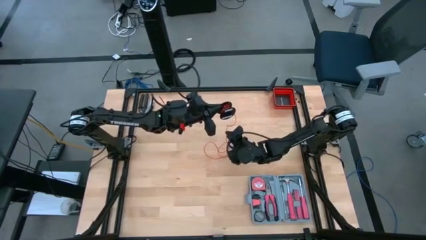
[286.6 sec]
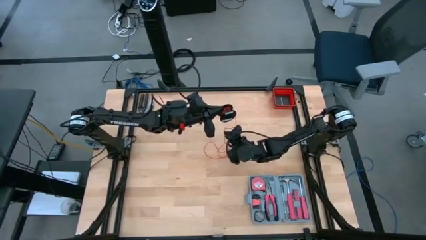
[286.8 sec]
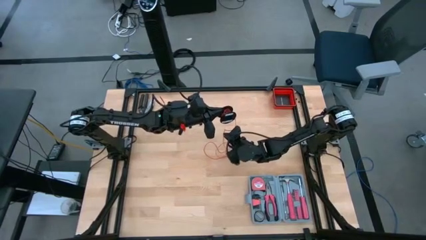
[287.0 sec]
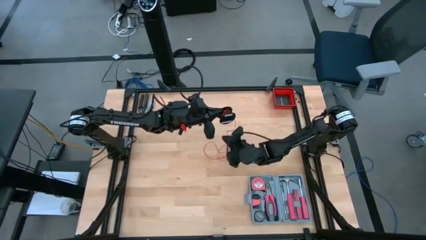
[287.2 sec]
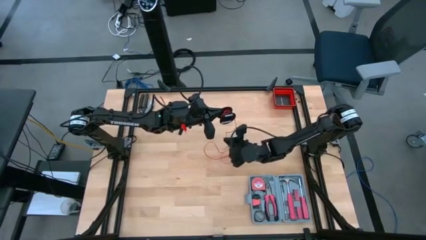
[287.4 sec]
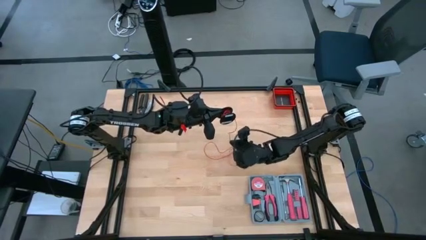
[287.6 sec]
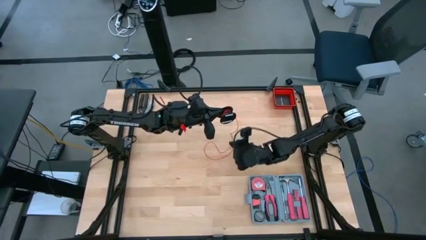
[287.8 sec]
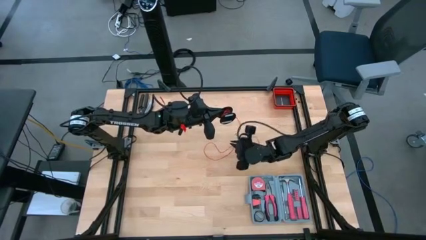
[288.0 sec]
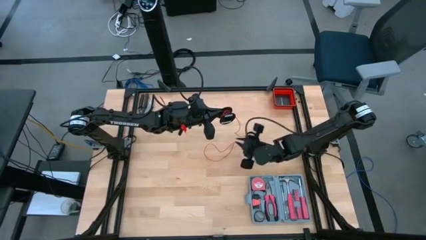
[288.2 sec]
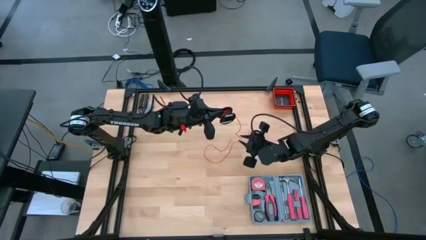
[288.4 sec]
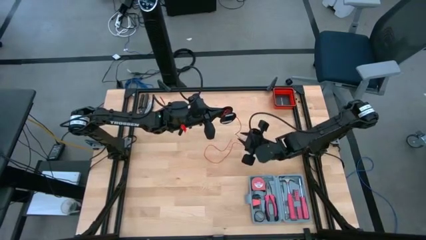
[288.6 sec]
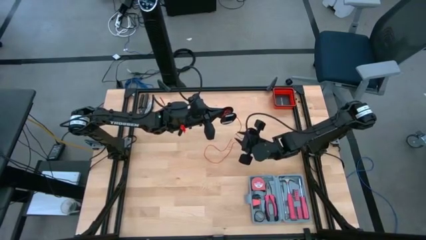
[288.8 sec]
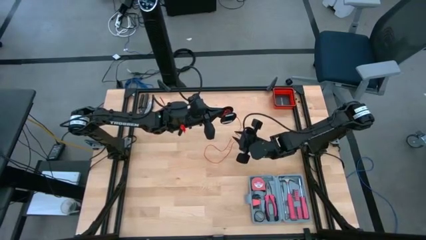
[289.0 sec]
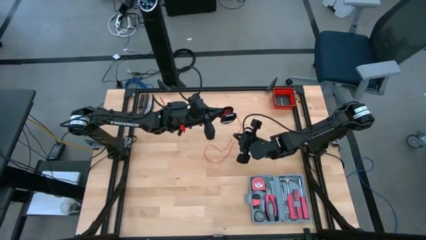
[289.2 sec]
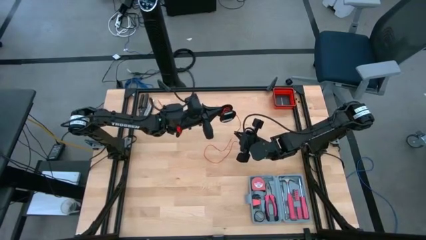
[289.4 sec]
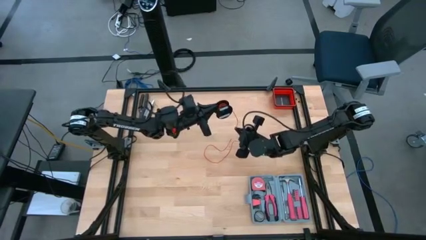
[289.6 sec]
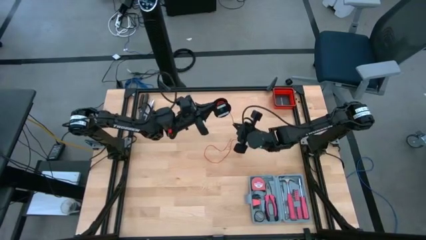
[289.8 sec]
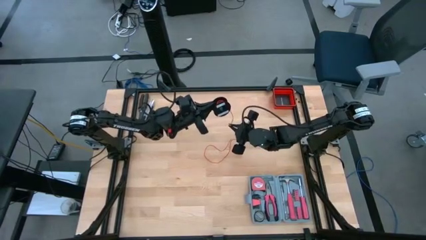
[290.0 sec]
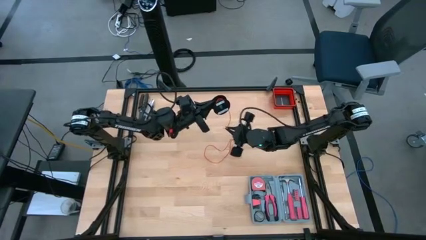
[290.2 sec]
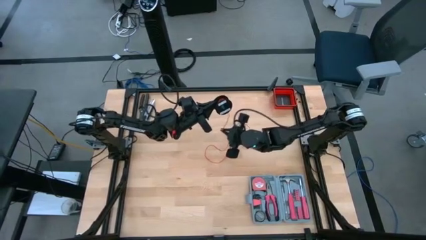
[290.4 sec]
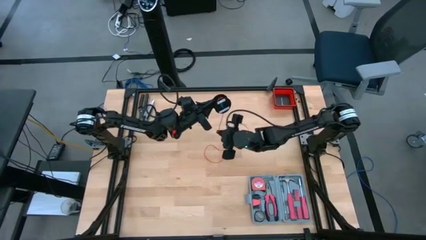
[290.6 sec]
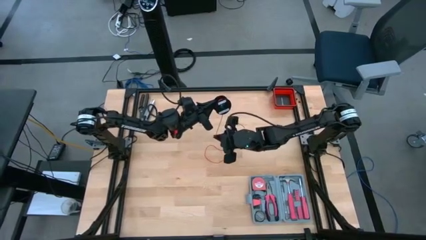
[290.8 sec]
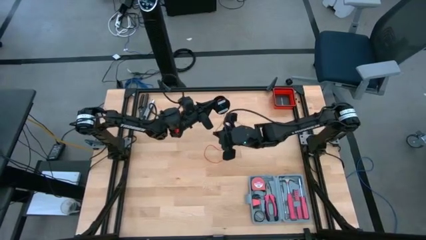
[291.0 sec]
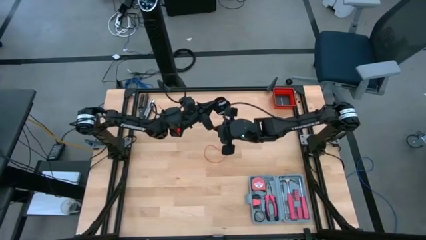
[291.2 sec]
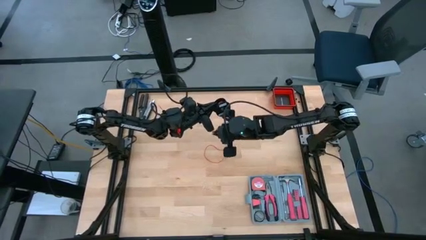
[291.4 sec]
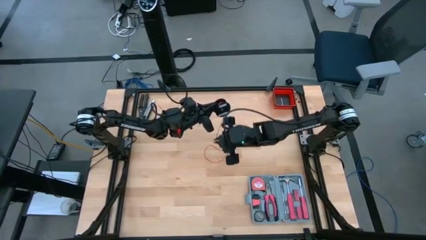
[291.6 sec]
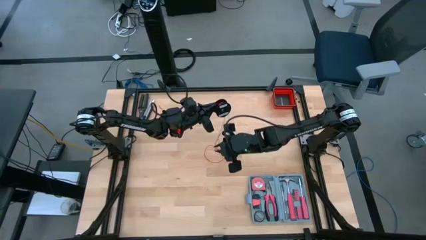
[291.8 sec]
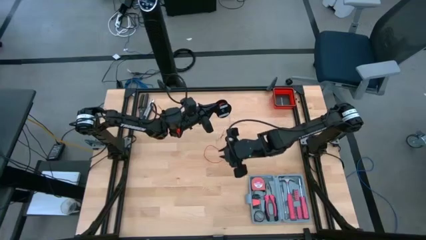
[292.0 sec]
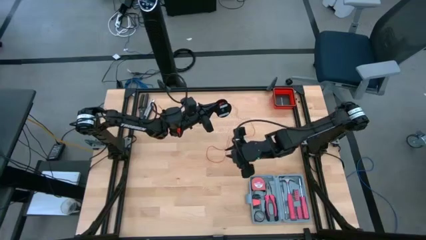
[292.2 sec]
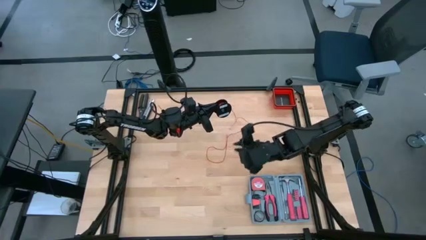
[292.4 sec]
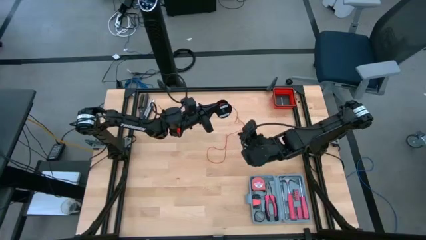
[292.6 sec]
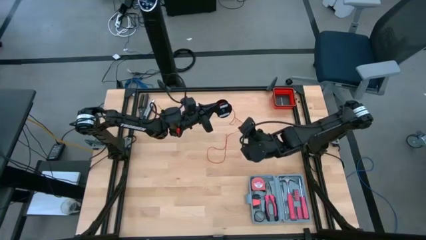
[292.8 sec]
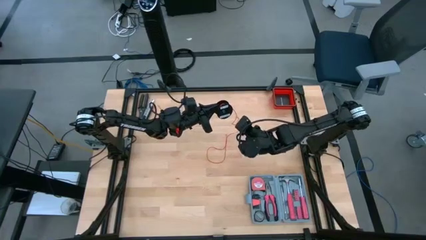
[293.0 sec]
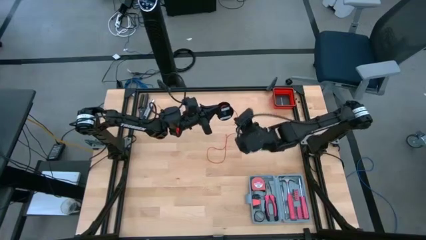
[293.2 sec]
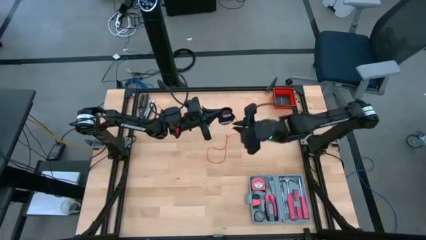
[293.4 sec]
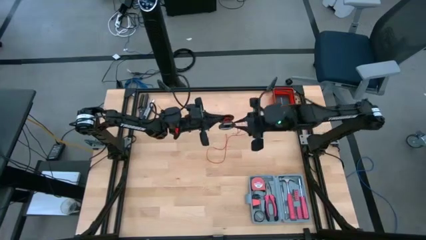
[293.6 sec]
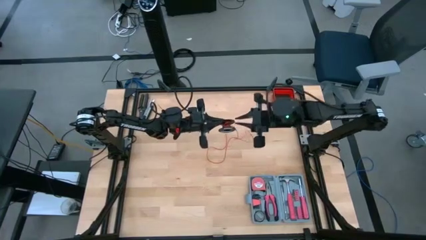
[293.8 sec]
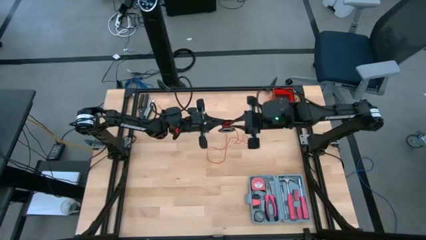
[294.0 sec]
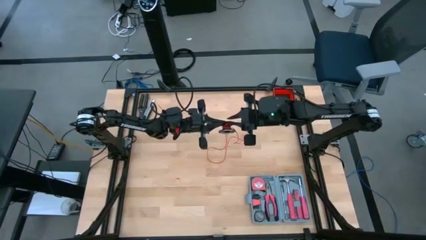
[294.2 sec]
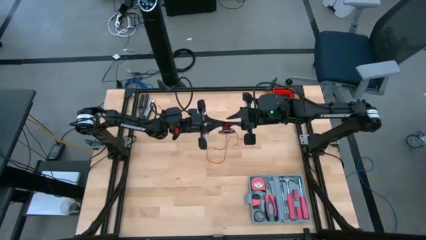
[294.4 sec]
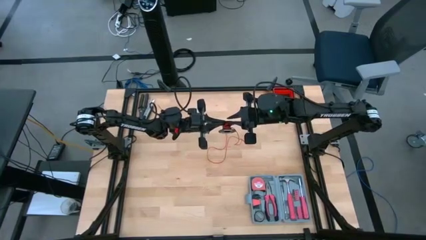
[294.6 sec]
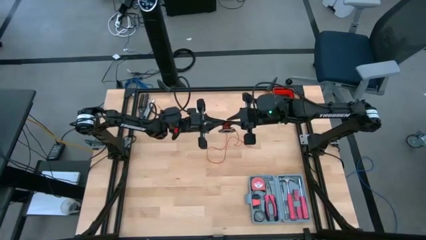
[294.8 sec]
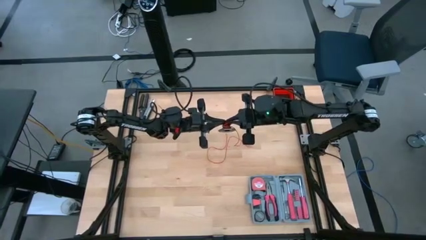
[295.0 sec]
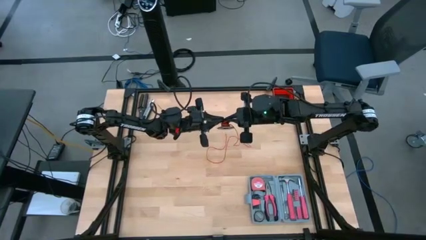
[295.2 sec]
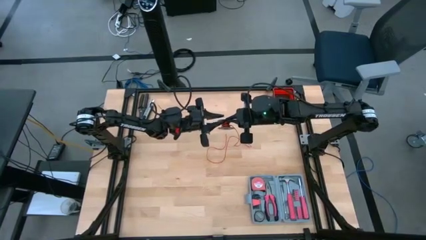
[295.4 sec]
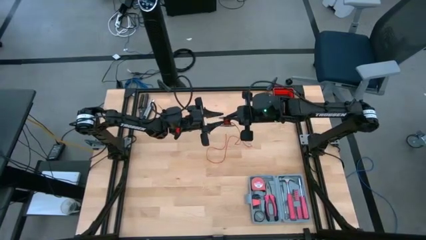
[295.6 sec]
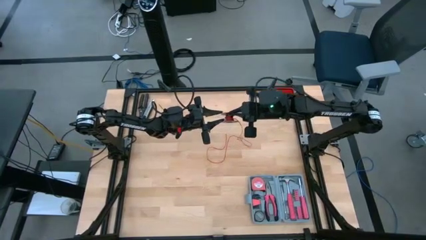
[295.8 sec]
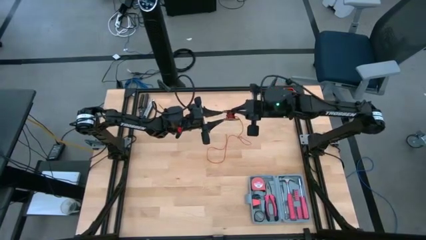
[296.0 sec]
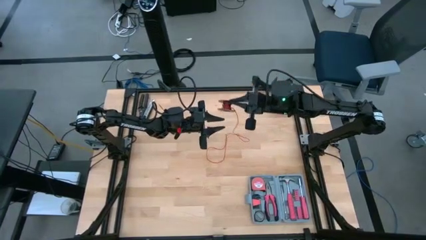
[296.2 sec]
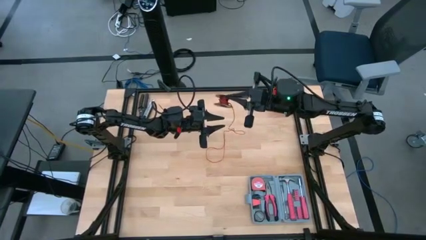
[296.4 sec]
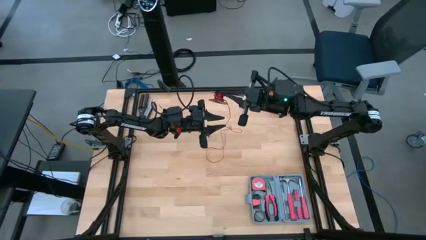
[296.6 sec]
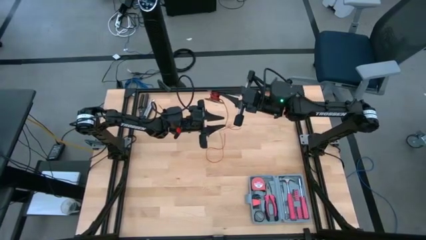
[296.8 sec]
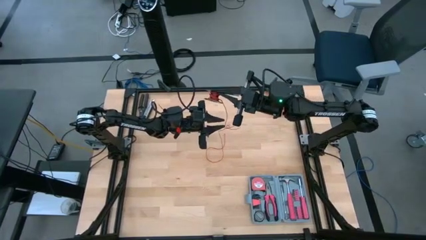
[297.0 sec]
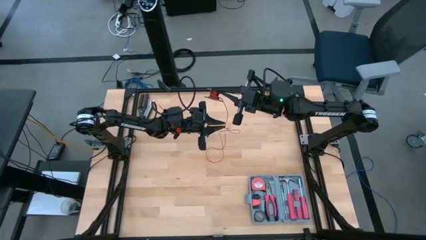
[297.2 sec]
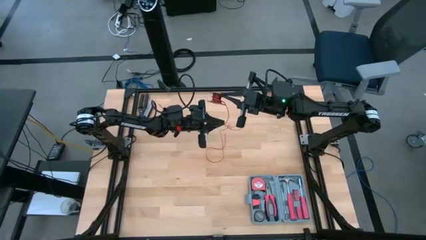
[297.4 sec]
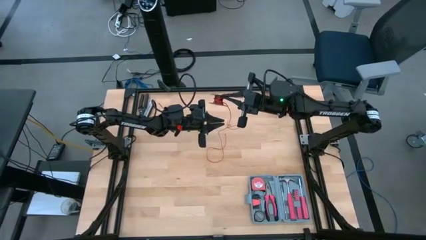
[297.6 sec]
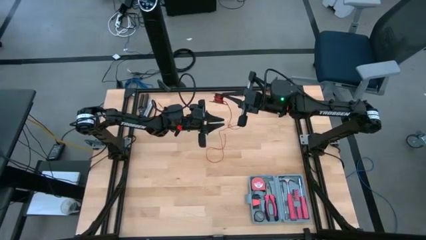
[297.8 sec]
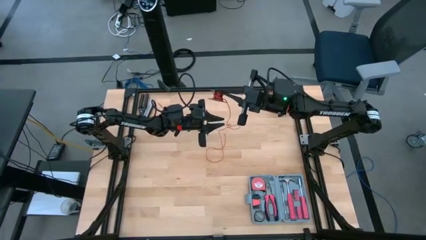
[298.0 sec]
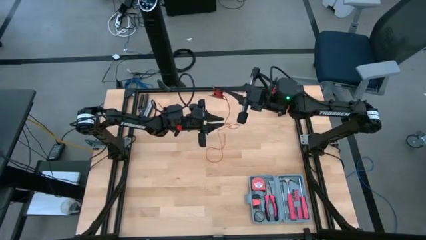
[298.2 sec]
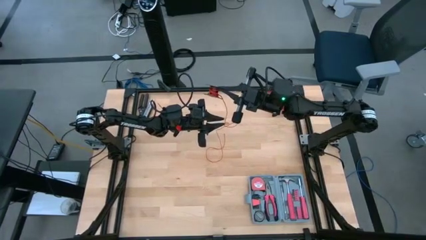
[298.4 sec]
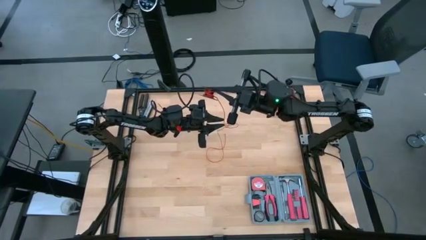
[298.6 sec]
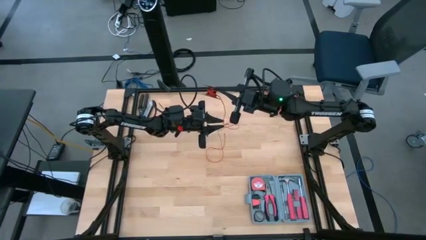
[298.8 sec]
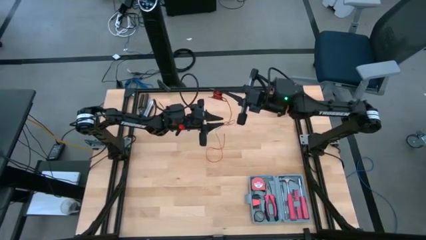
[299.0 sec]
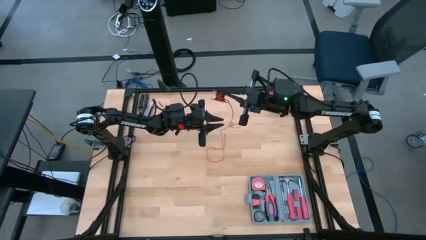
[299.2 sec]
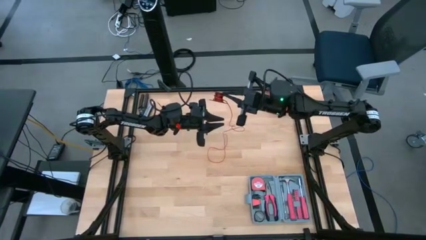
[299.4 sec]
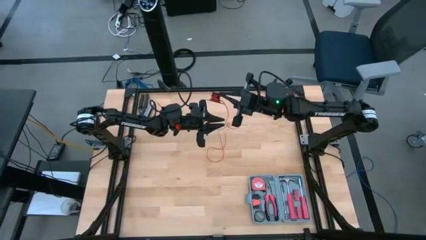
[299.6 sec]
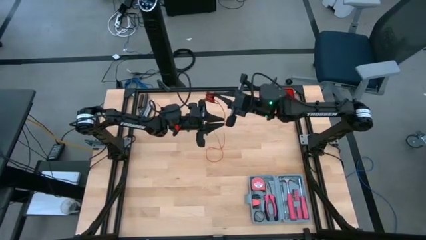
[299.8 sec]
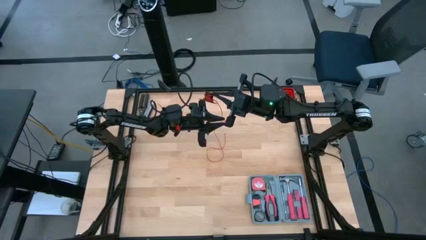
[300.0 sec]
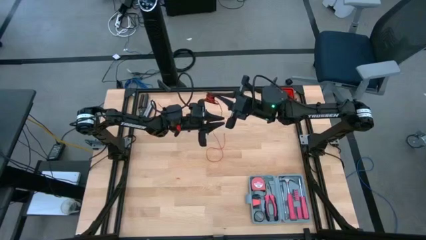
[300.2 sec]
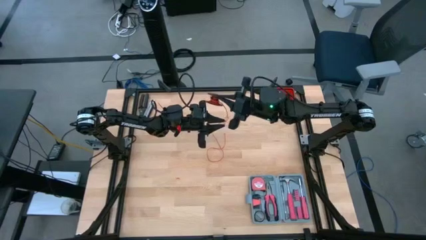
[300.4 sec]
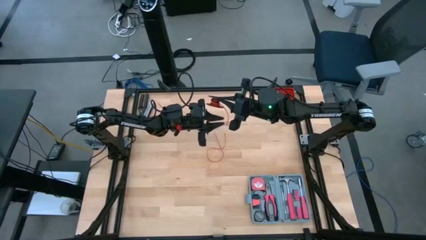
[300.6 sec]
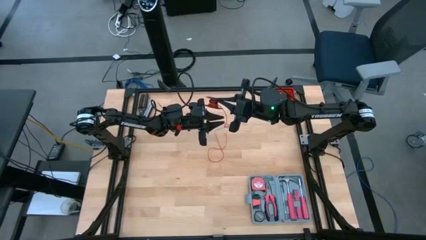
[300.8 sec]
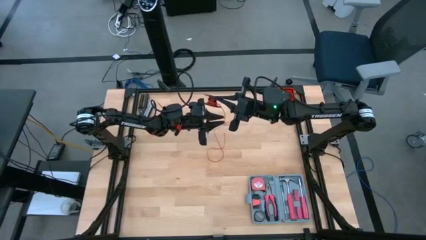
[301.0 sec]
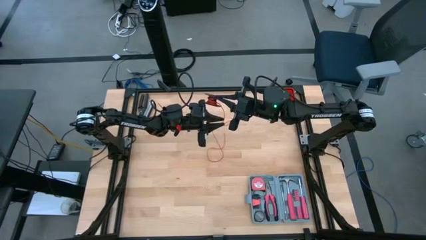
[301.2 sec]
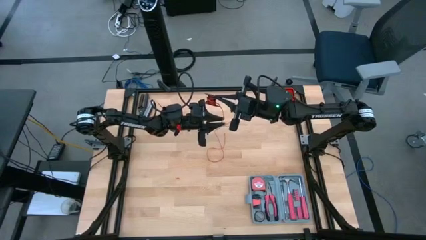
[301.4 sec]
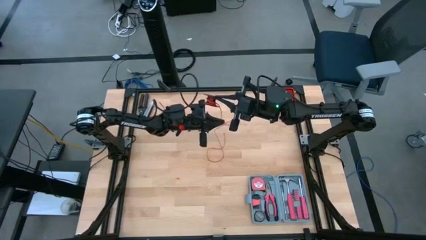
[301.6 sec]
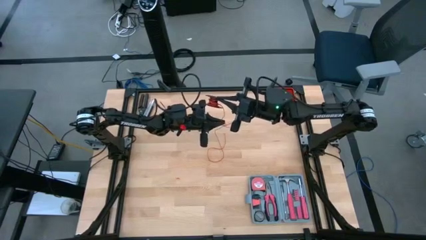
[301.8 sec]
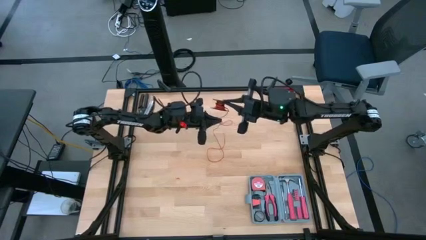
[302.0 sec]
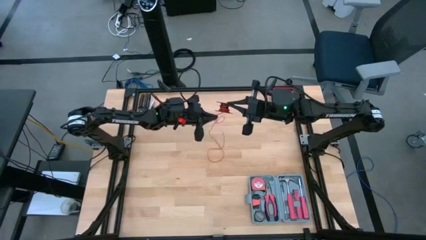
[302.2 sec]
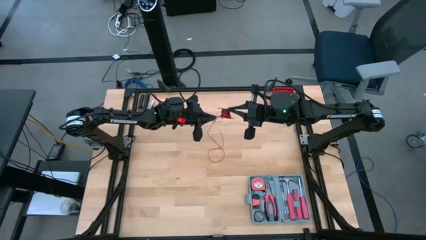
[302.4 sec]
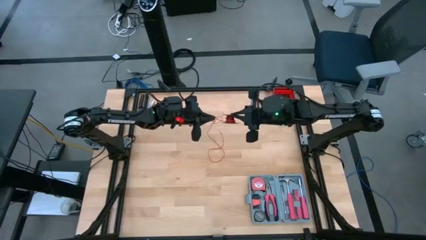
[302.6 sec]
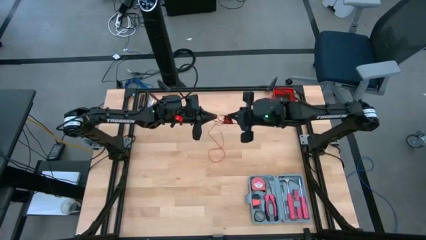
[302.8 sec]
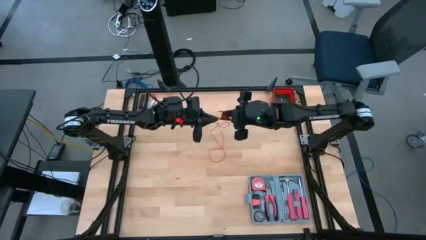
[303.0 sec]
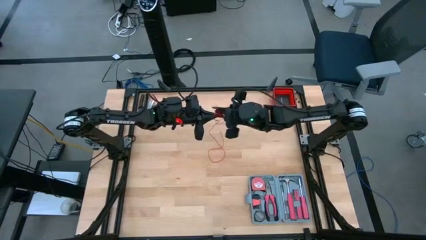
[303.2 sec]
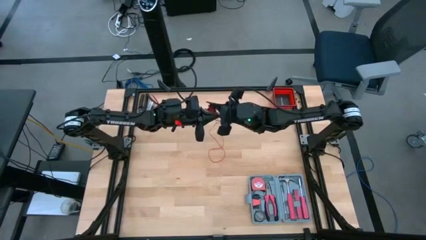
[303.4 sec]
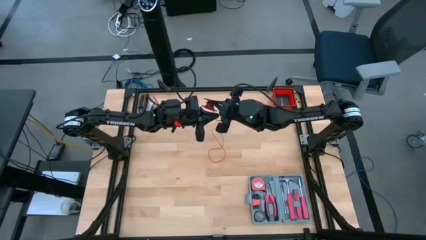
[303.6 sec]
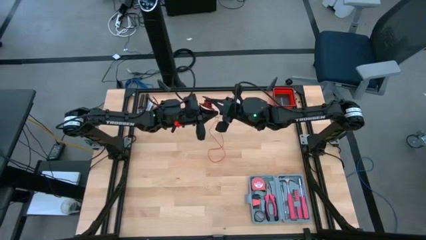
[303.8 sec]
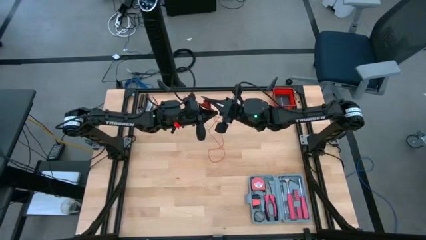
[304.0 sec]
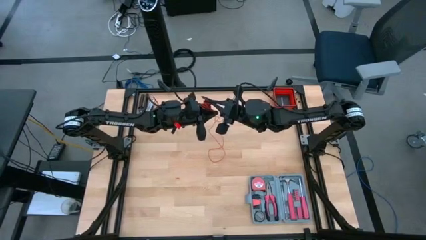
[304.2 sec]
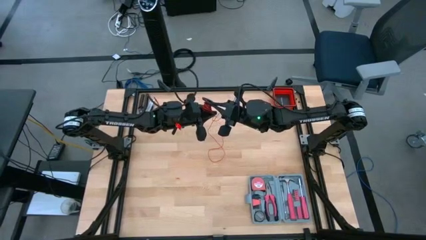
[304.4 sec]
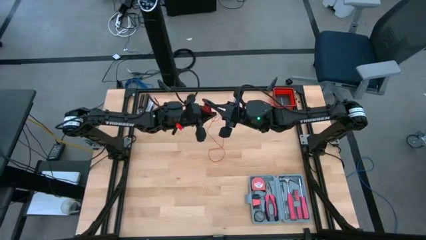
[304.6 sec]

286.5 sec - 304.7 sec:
Task: Coil cords
Coil the wire
